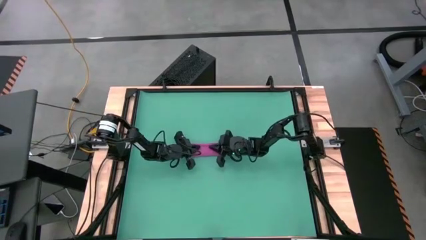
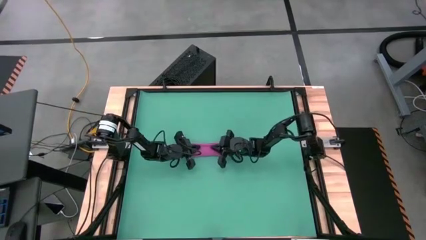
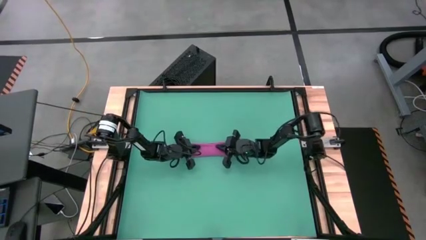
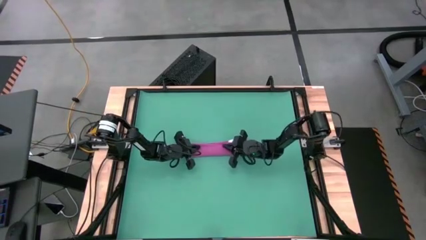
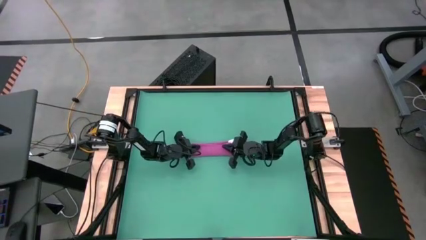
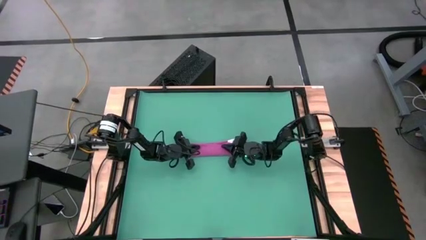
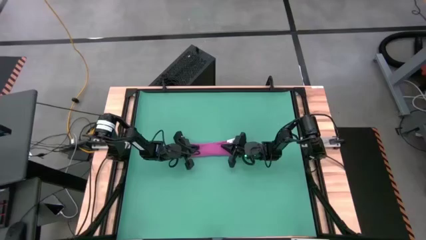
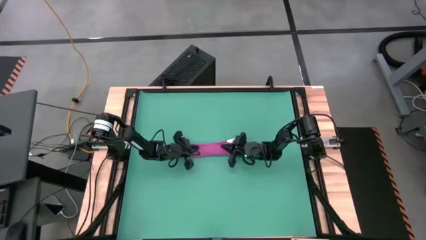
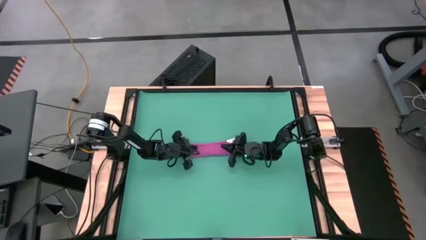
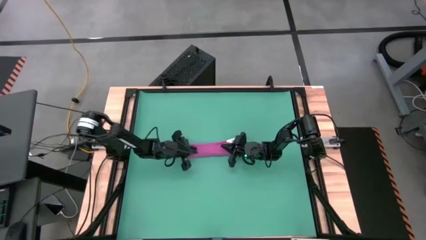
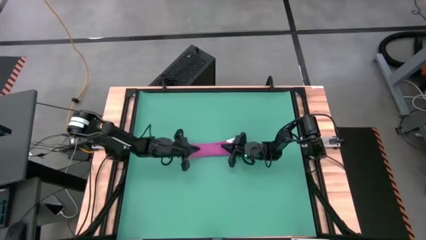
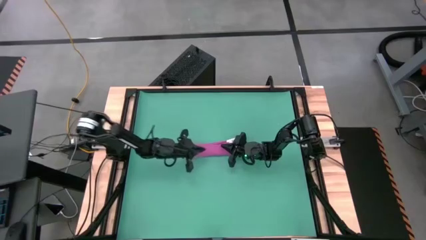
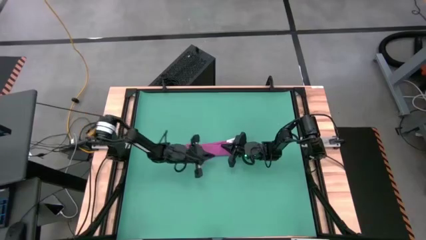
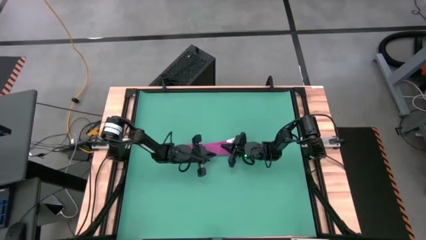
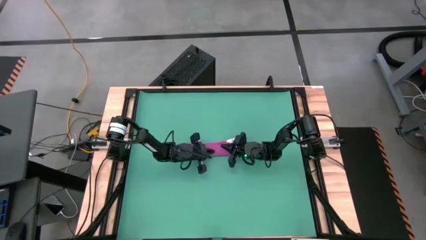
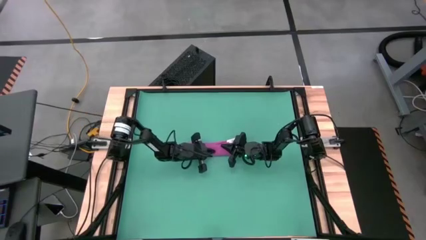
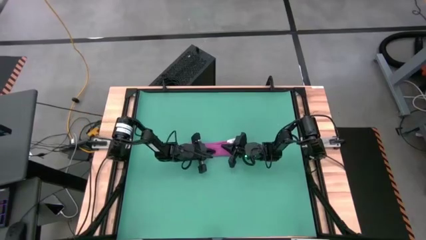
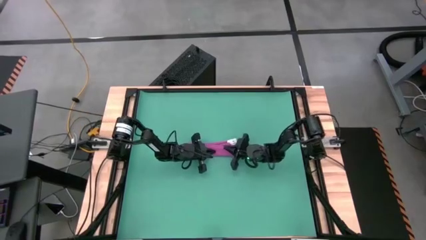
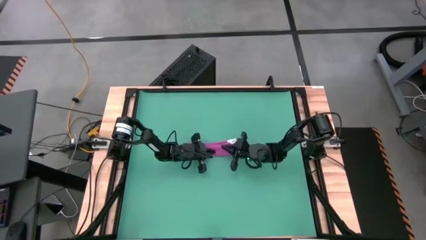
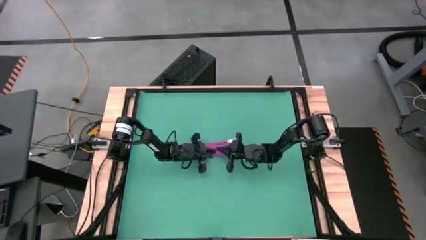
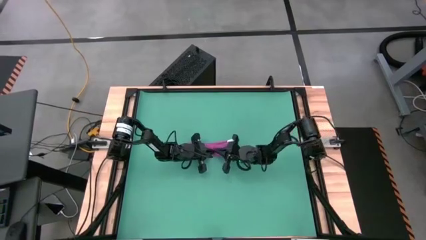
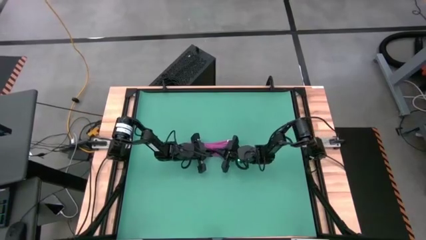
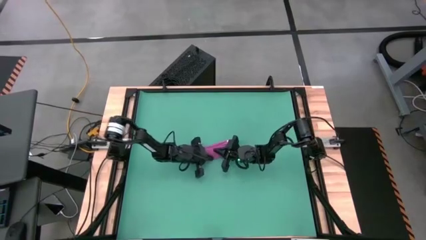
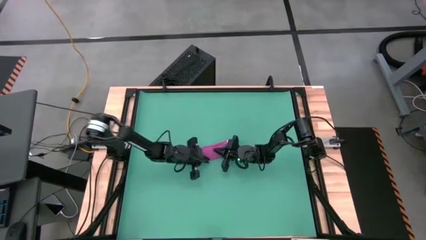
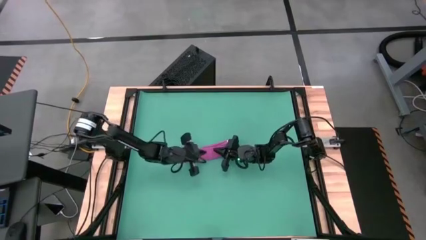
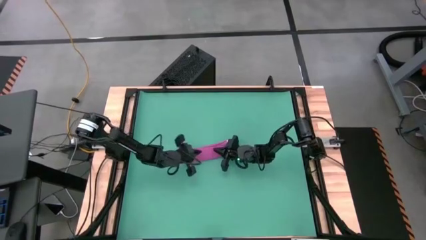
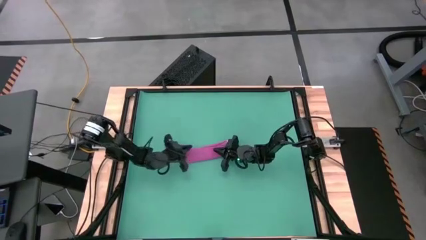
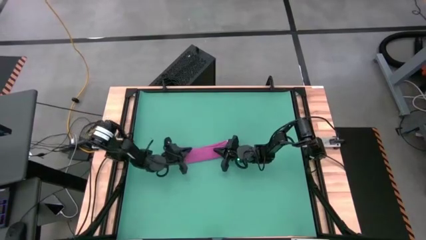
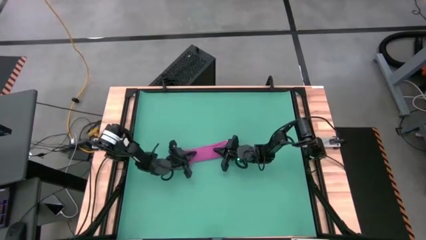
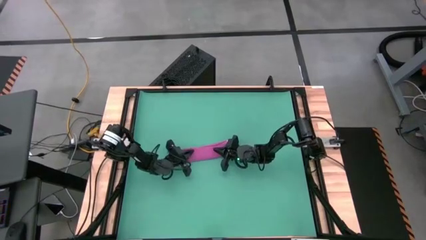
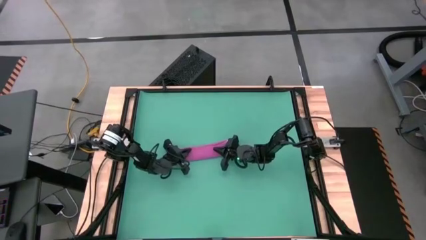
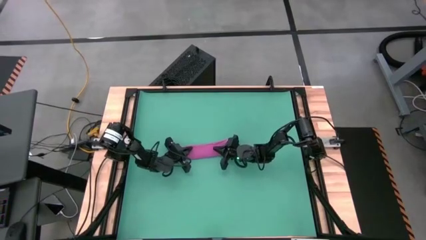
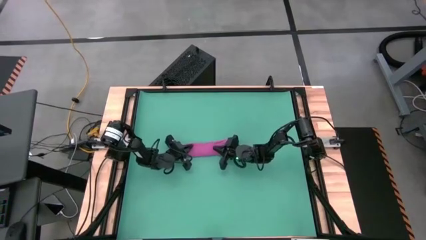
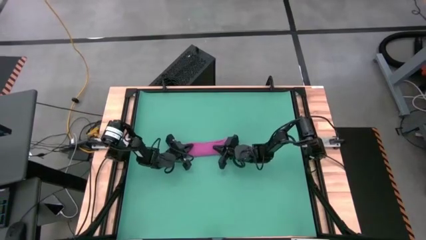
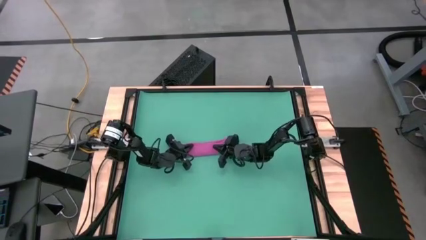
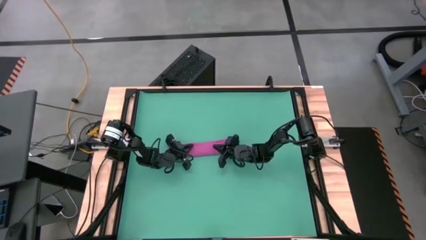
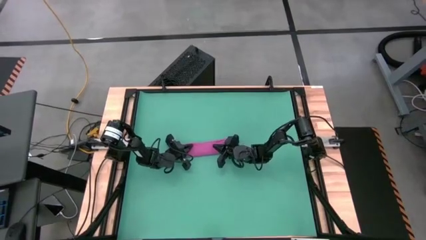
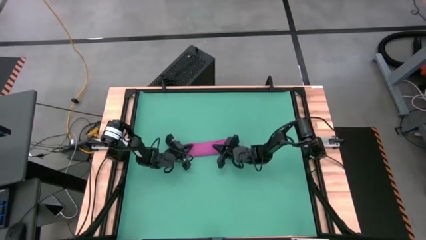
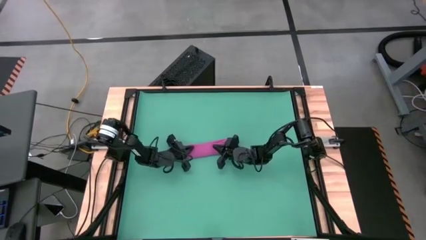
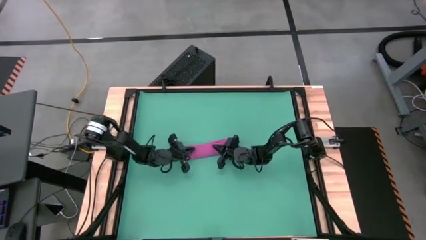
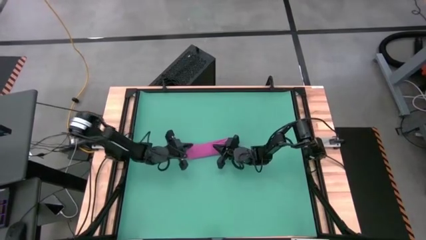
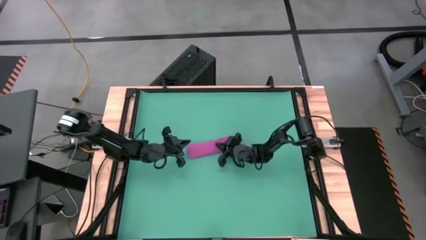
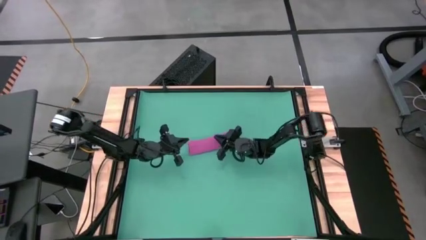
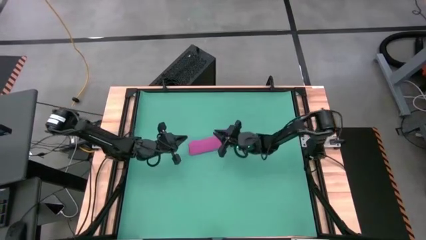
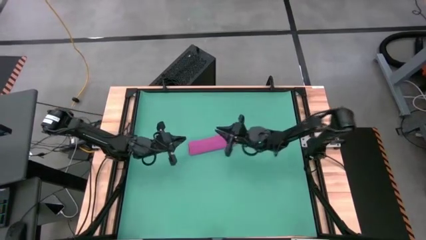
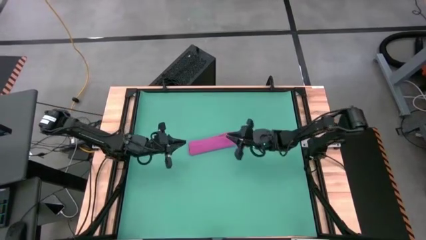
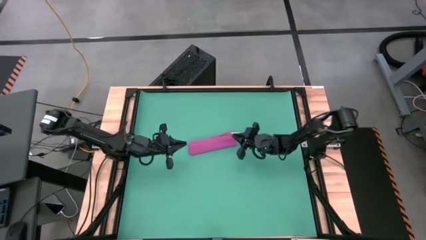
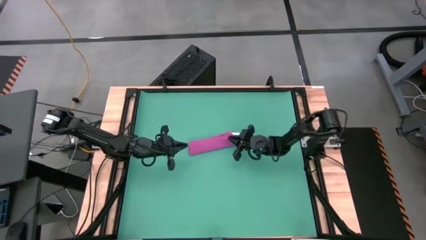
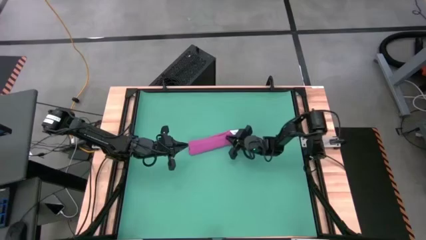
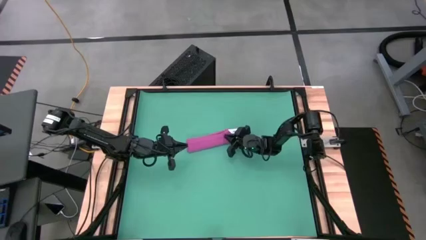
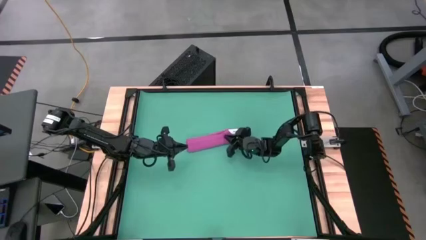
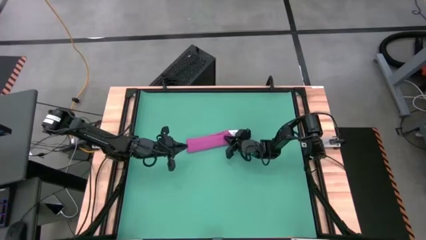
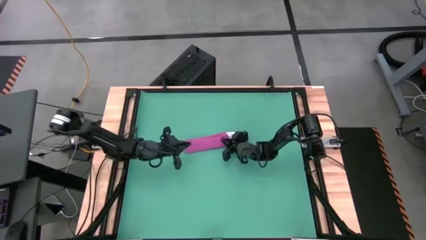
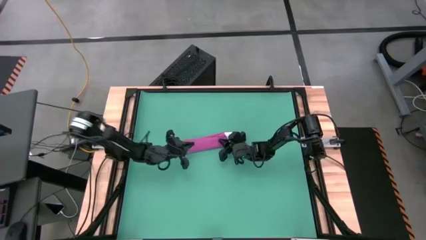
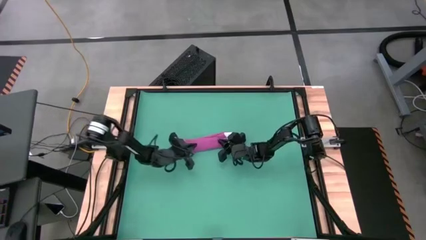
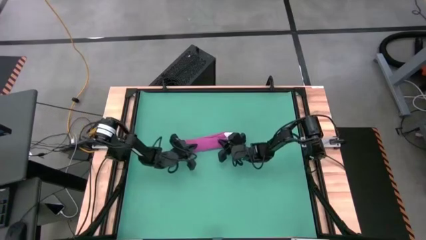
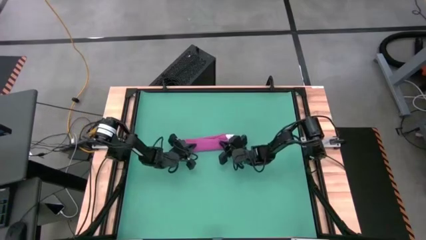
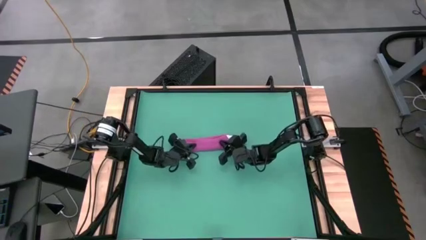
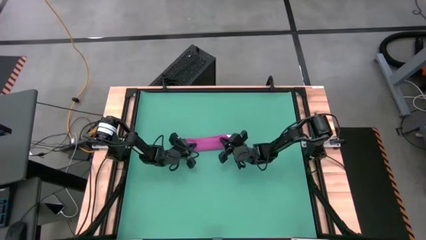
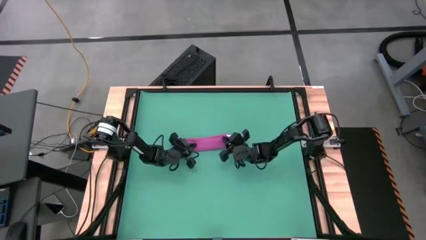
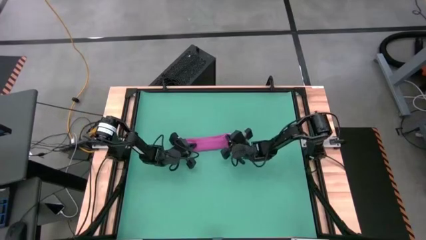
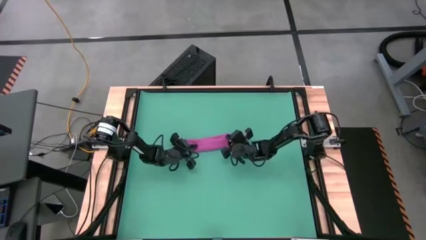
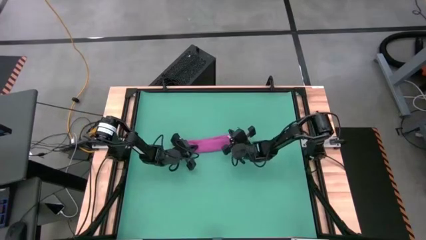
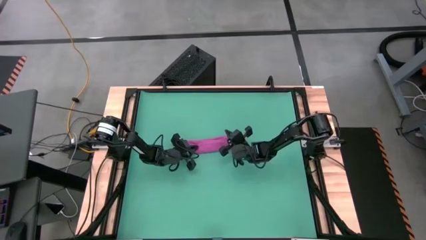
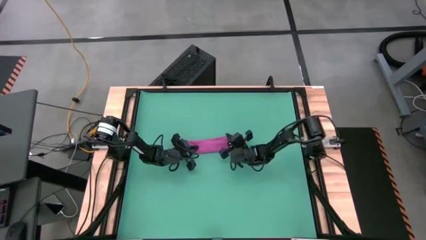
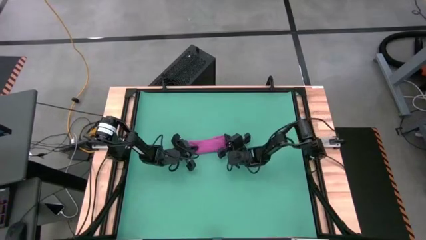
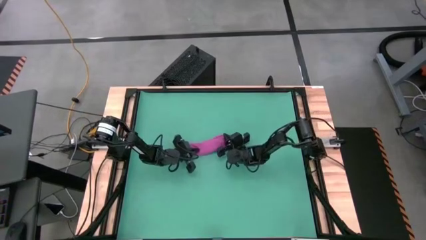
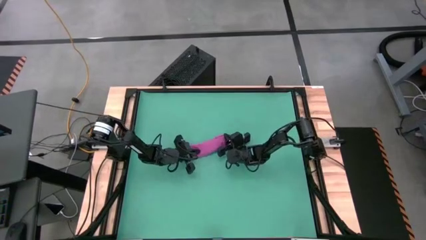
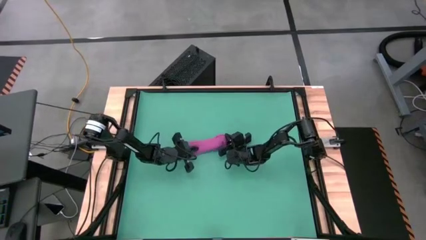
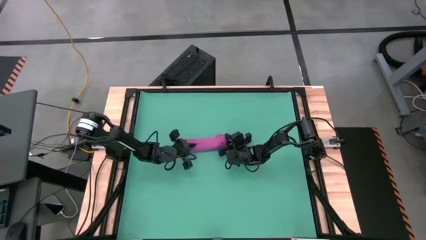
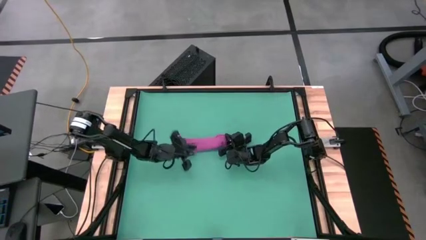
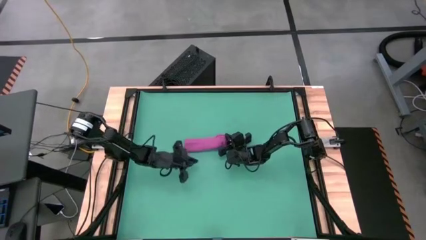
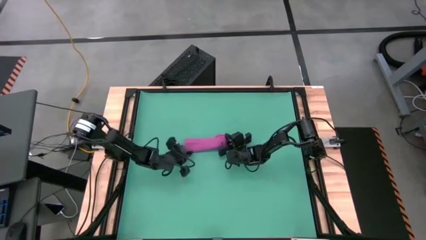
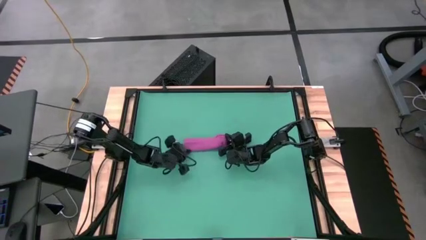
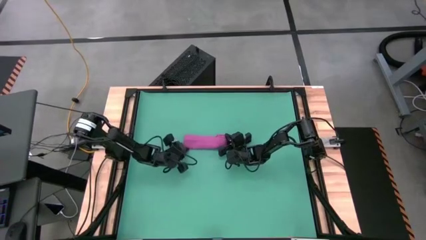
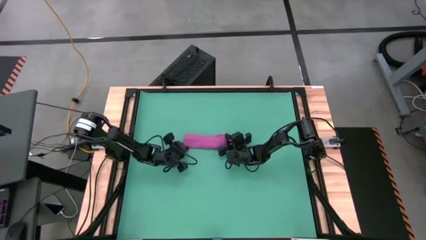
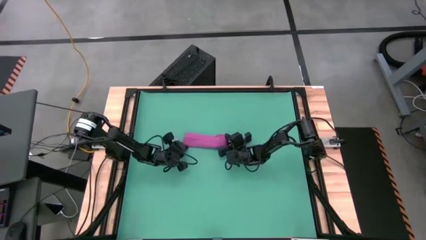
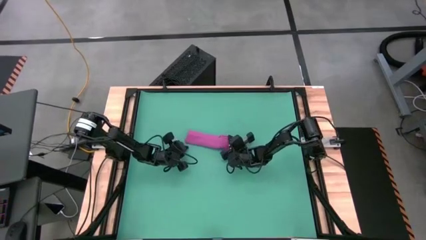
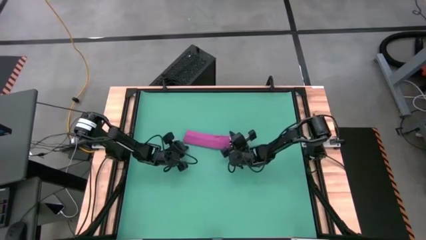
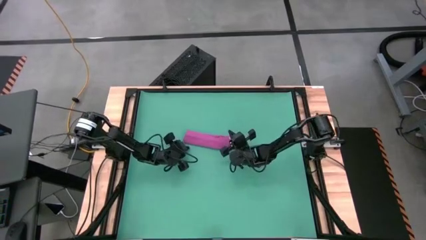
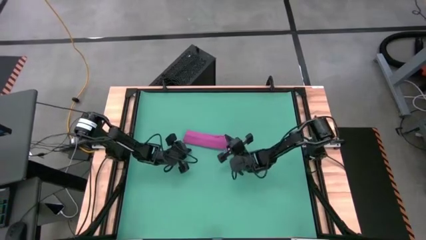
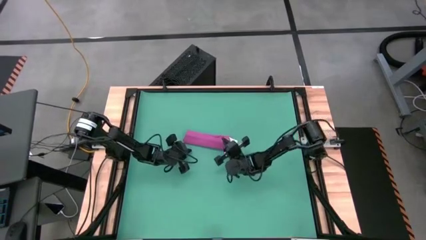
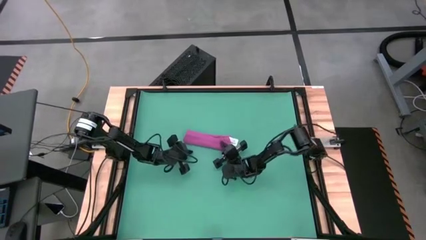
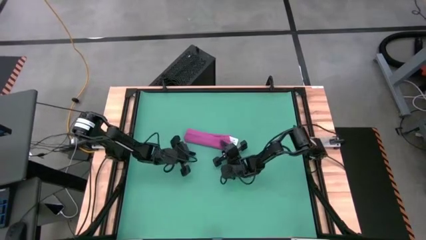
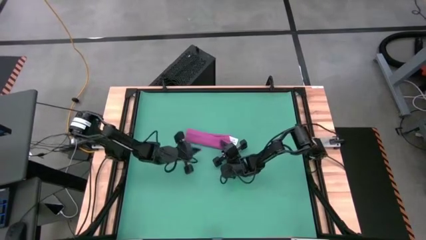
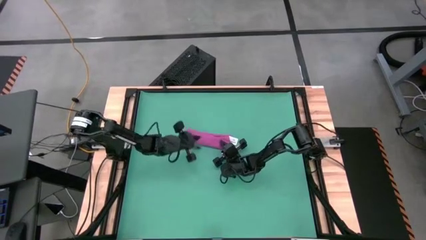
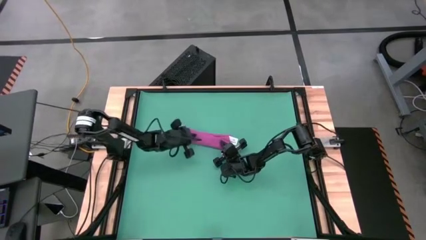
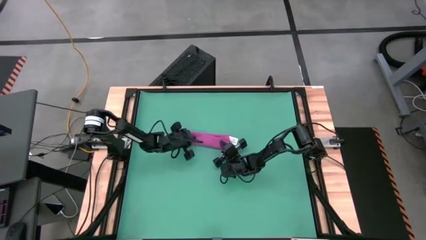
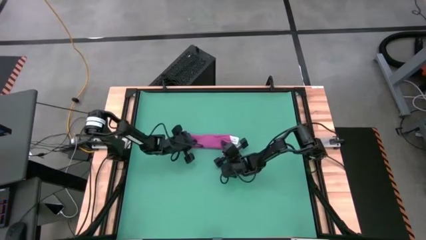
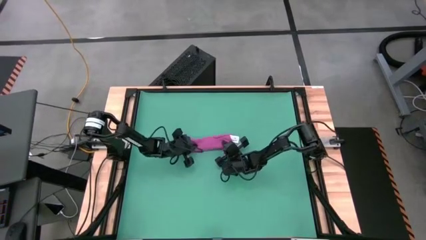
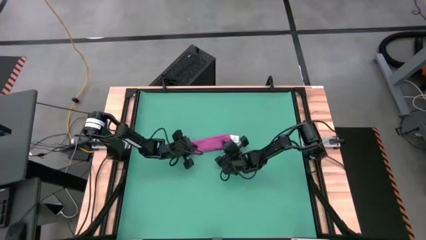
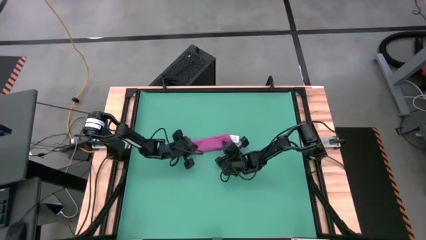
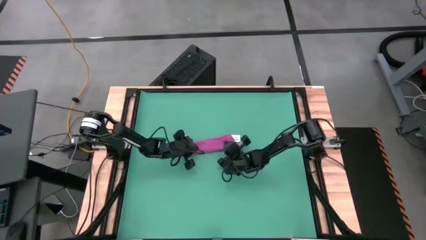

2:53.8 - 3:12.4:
Task: Roll towel into tight, uniform cylinder
Roll the pink towel
